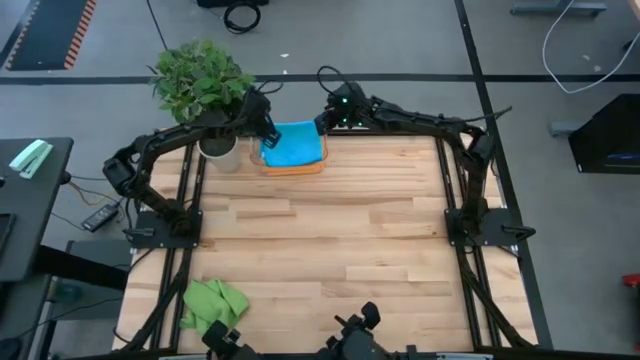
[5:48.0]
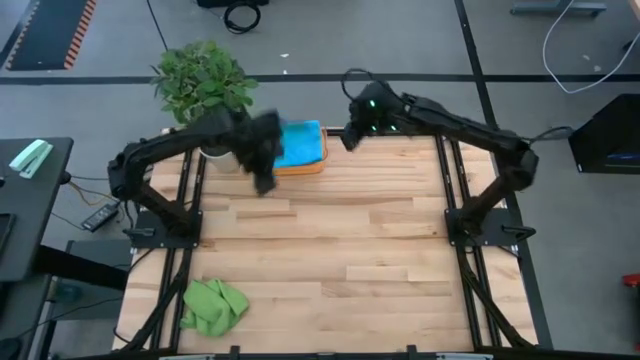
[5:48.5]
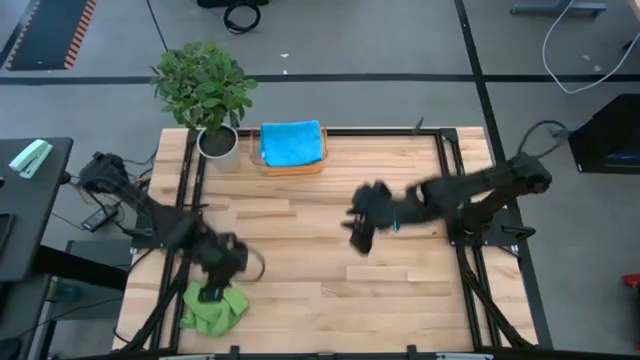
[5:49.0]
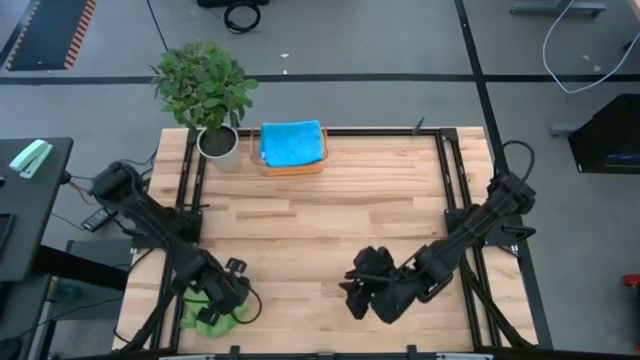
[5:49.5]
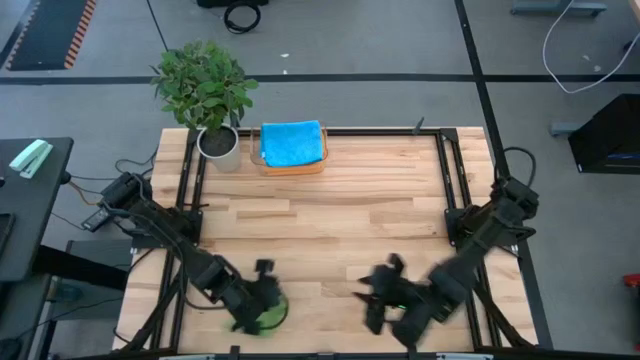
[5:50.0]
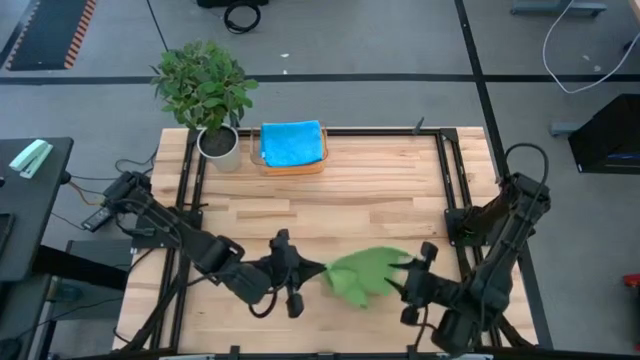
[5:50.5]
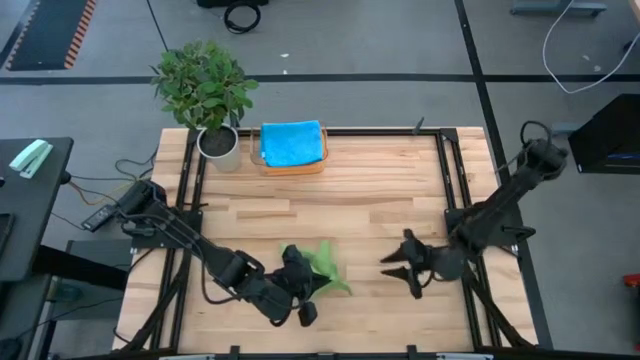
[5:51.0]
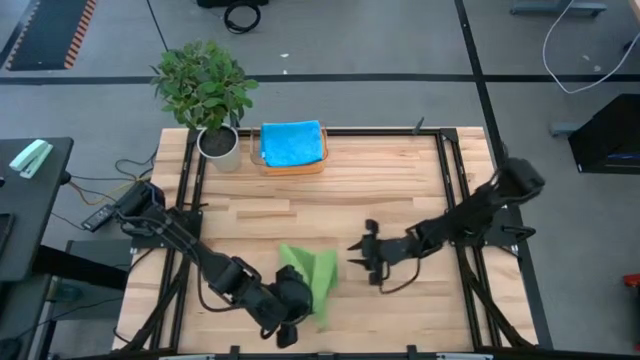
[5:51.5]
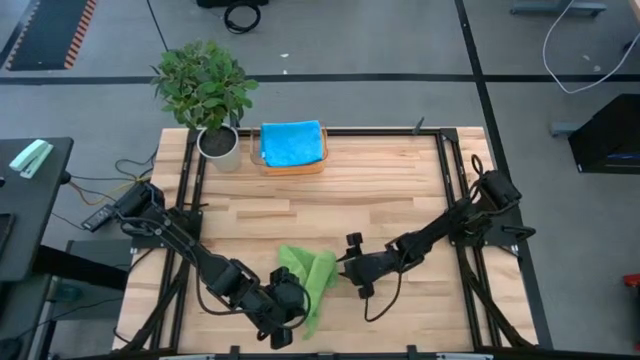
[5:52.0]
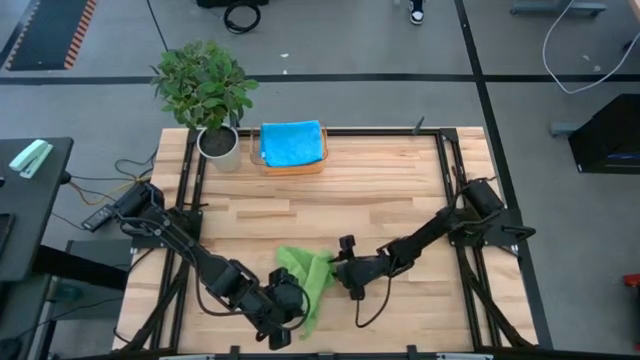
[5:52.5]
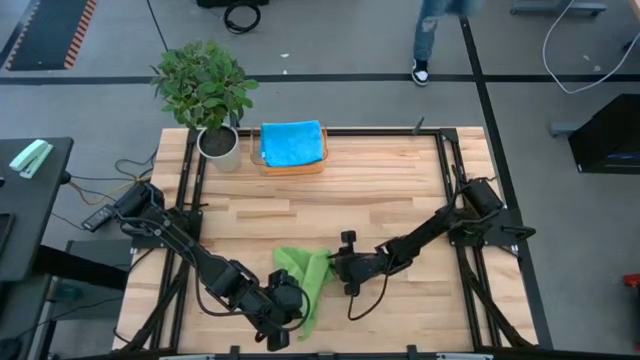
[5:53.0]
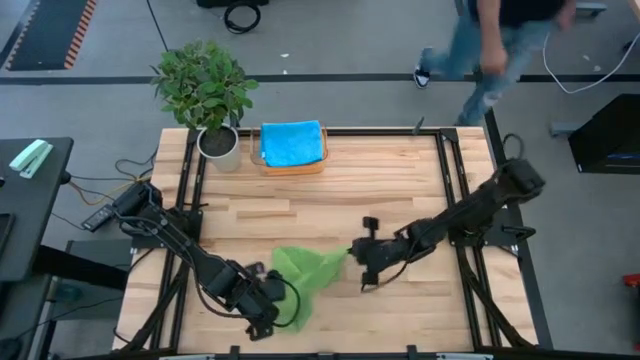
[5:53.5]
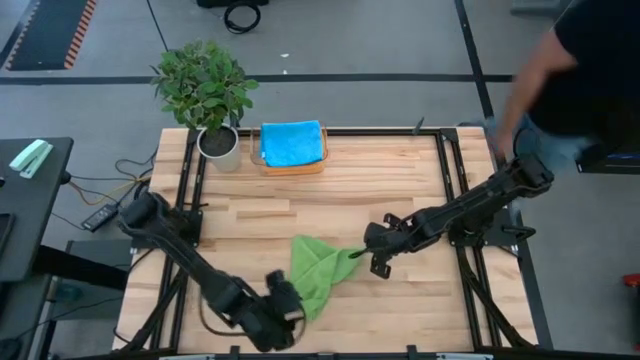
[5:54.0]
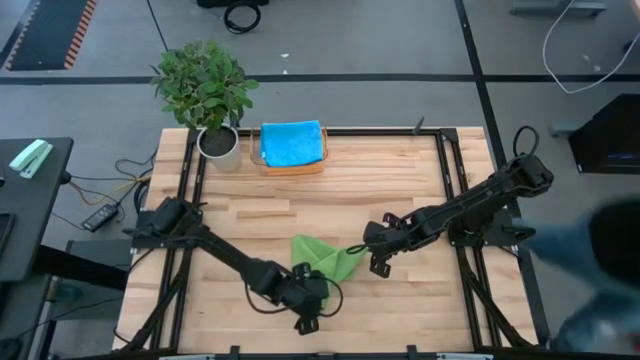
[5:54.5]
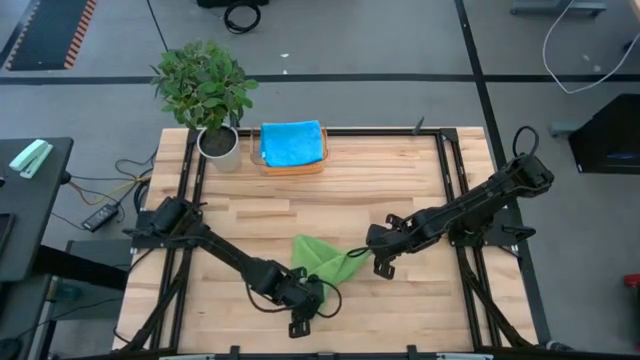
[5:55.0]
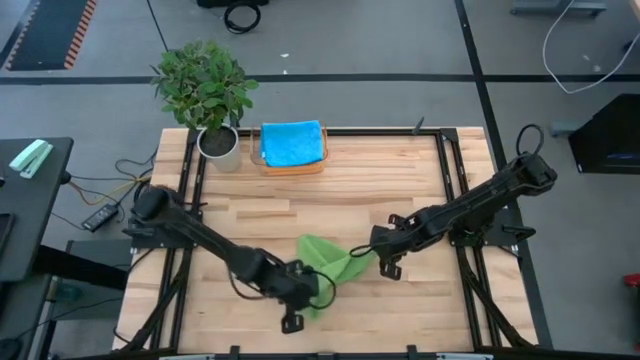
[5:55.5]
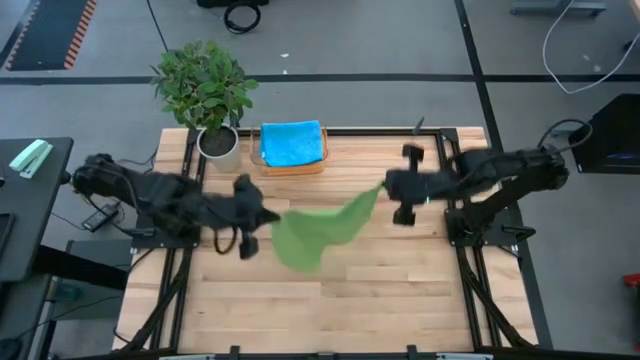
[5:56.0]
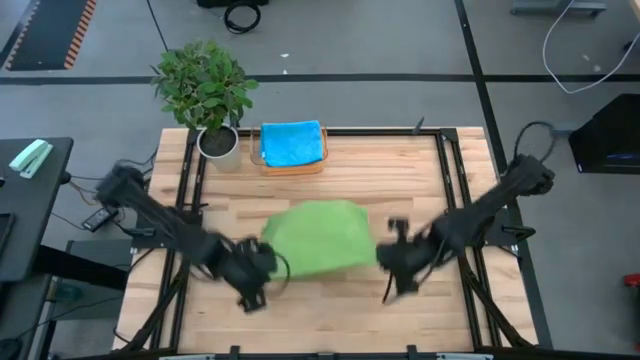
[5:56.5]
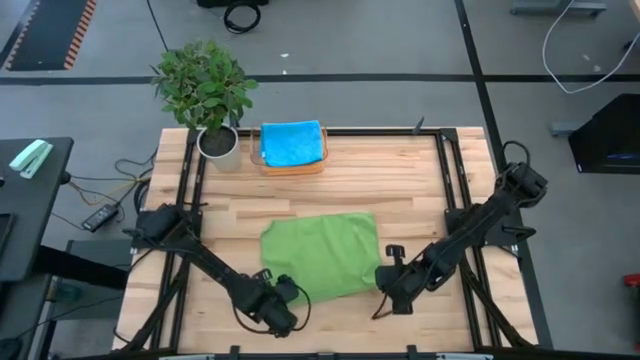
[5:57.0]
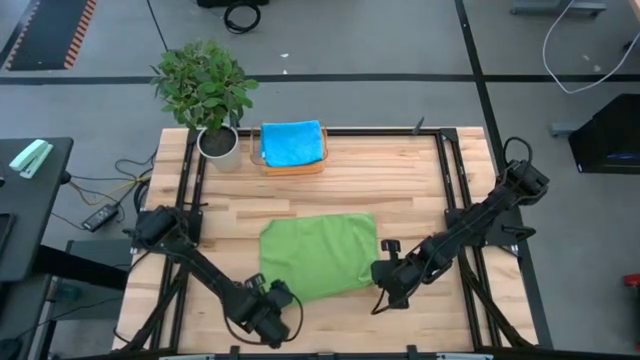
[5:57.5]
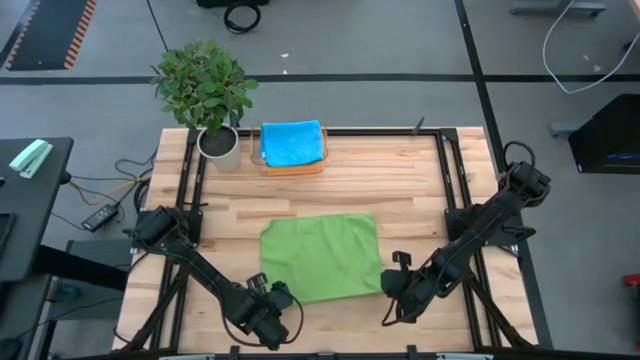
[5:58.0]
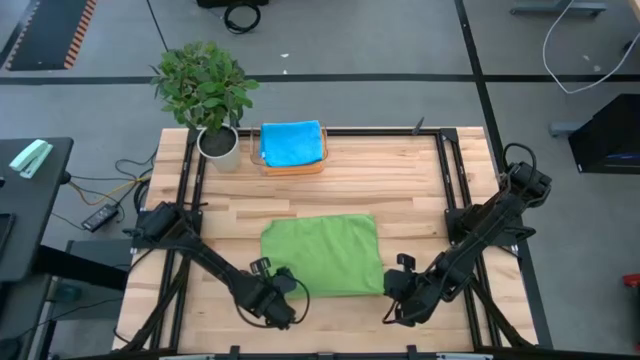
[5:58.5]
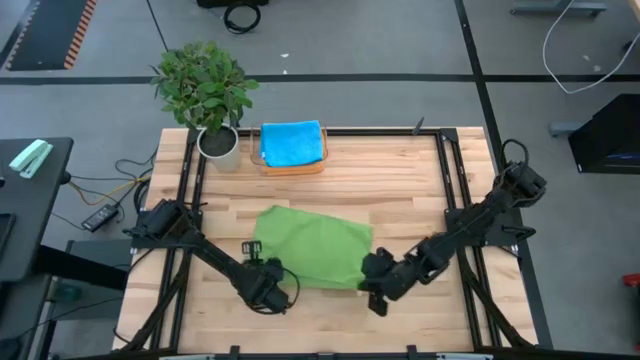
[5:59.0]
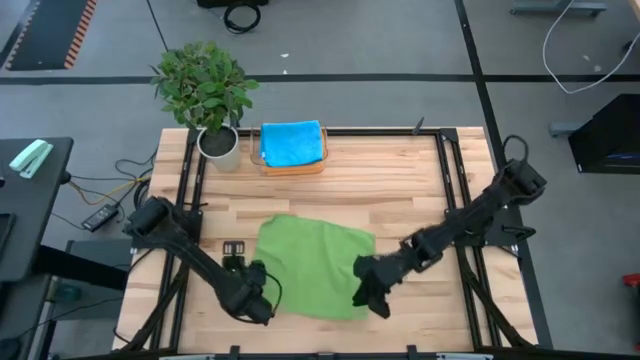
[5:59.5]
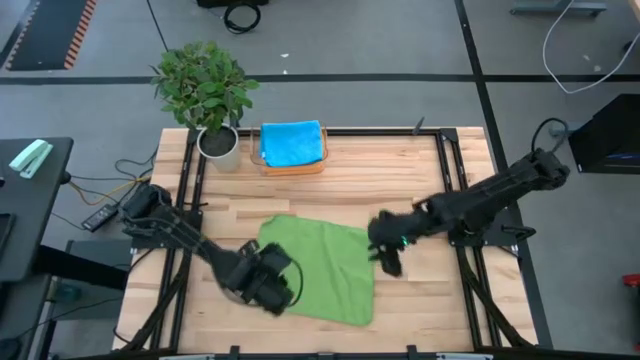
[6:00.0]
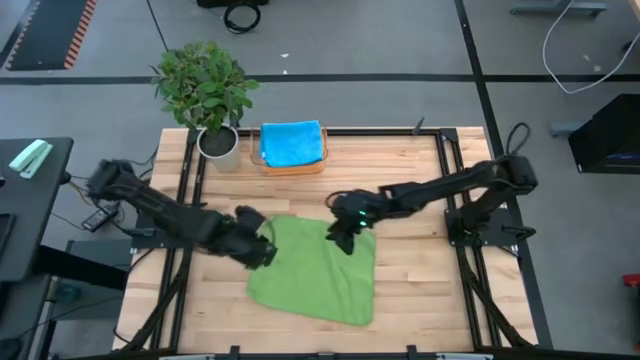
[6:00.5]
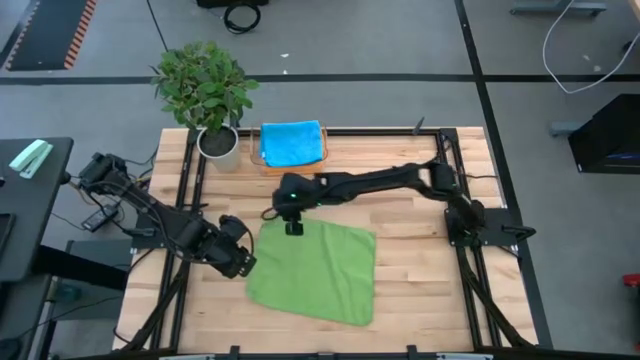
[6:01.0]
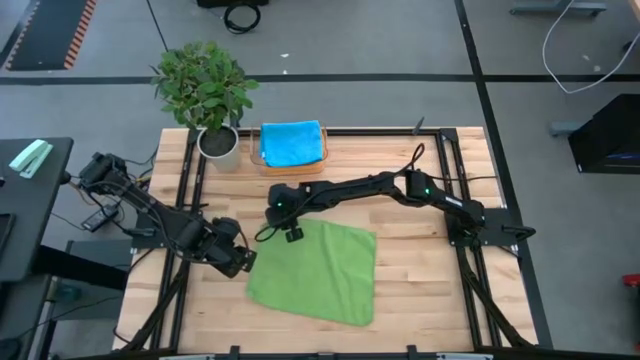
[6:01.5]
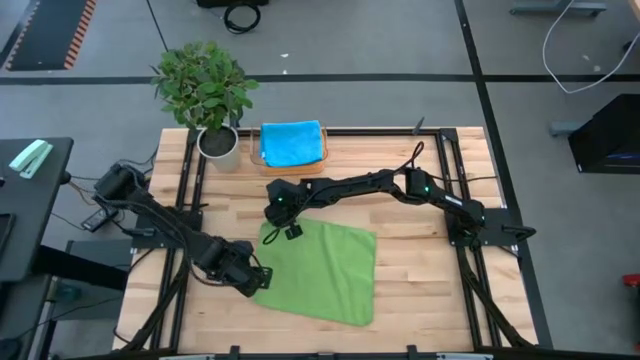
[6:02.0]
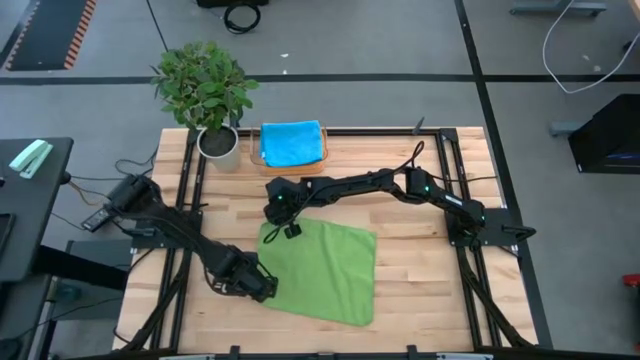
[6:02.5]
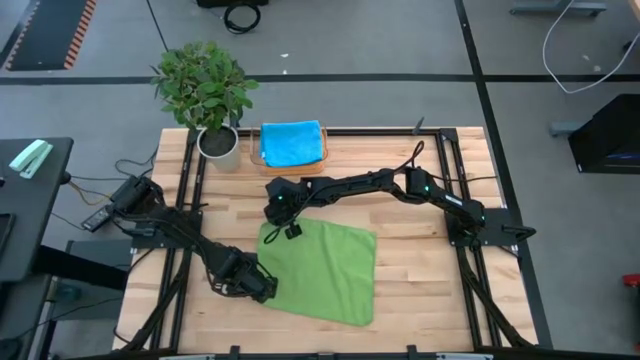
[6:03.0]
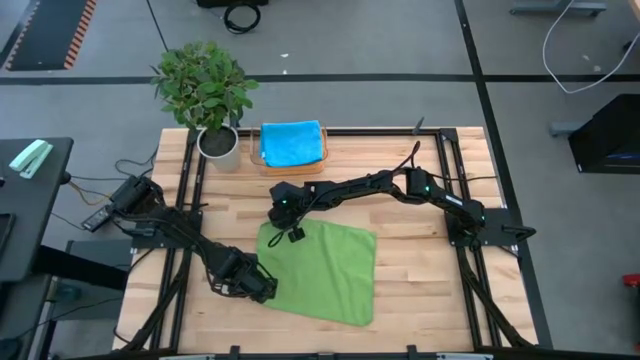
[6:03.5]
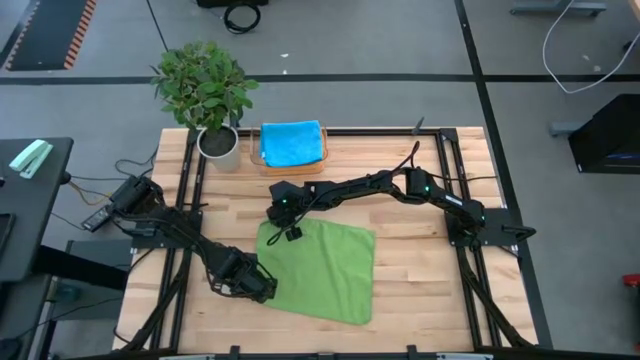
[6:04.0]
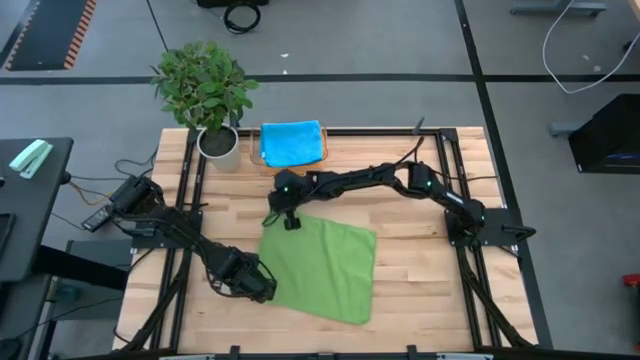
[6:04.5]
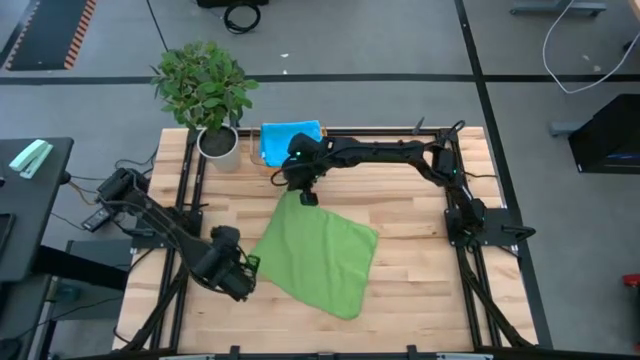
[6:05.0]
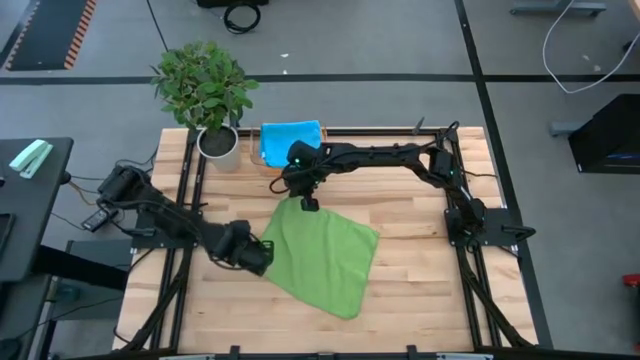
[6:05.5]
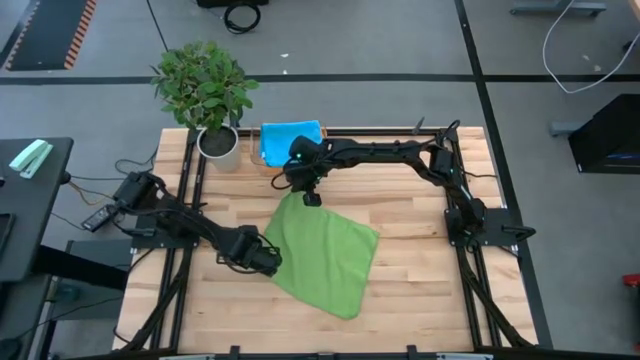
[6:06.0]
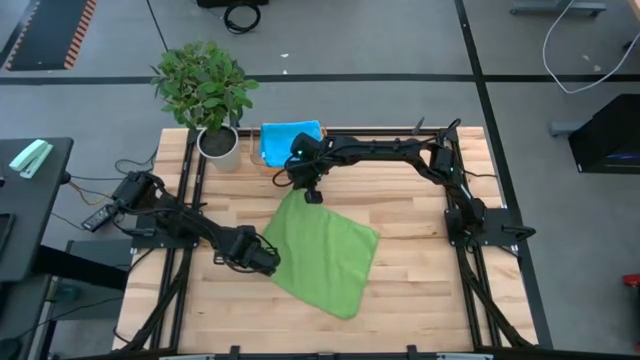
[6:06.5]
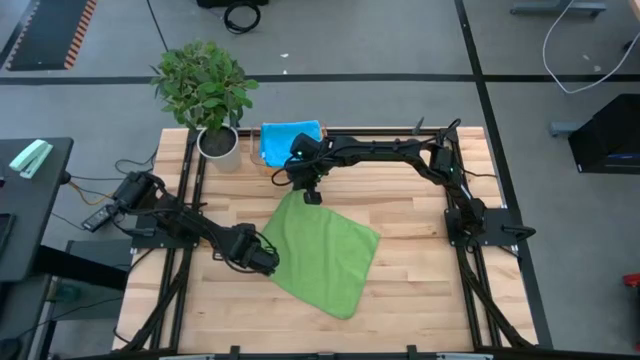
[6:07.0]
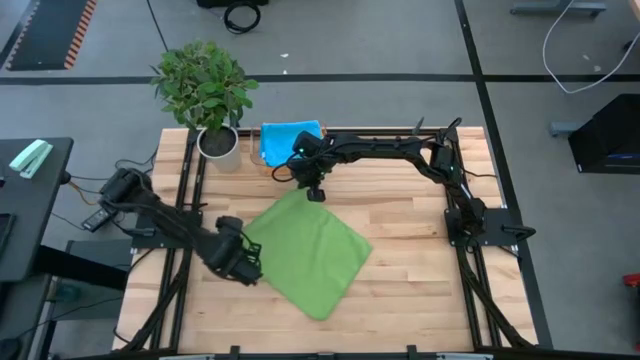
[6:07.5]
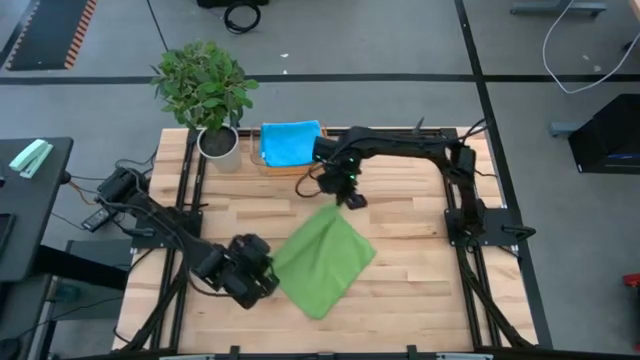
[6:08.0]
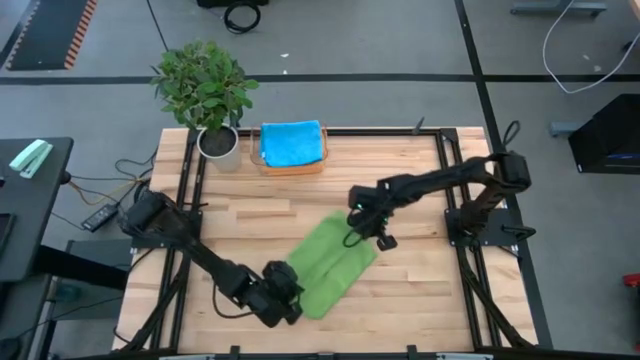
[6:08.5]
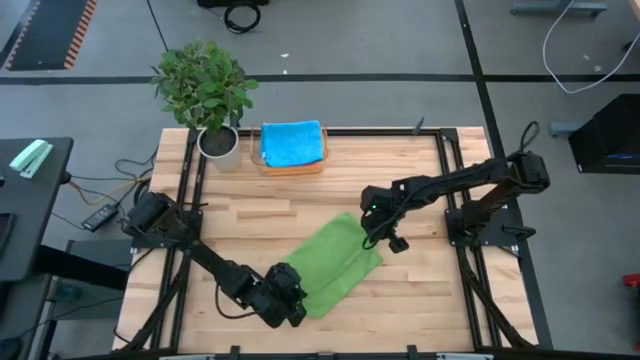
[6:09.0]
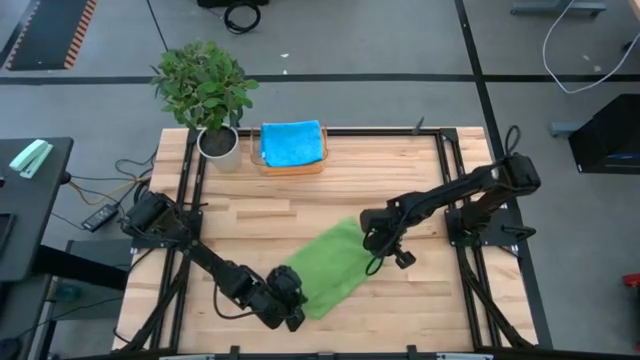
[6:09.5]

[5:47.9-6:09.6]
Task: Fold microfiber towels
Fold the green microfiber cloth
